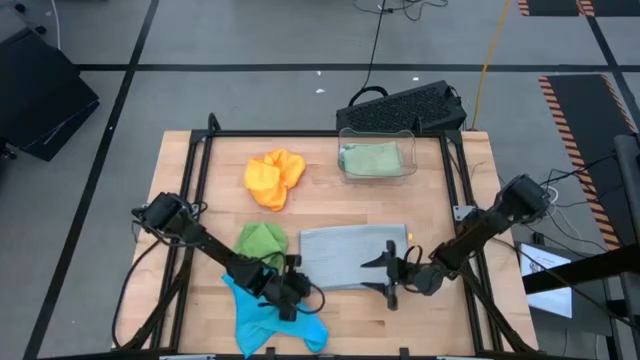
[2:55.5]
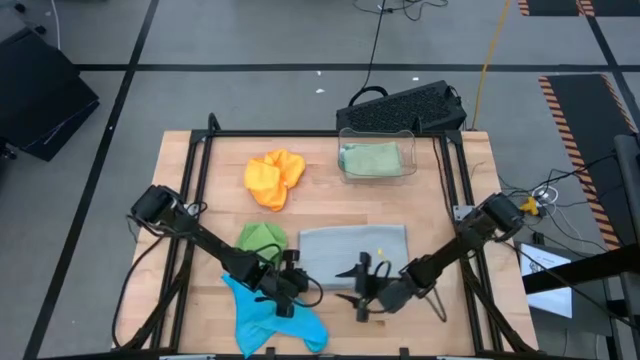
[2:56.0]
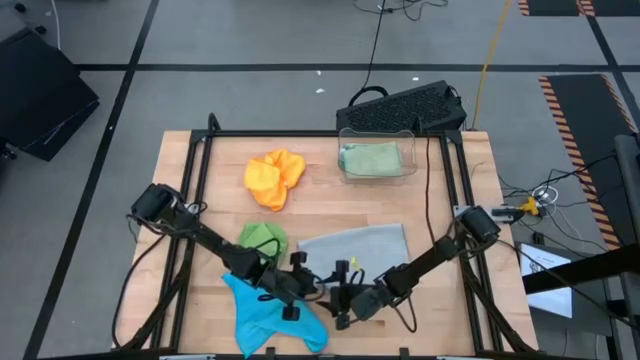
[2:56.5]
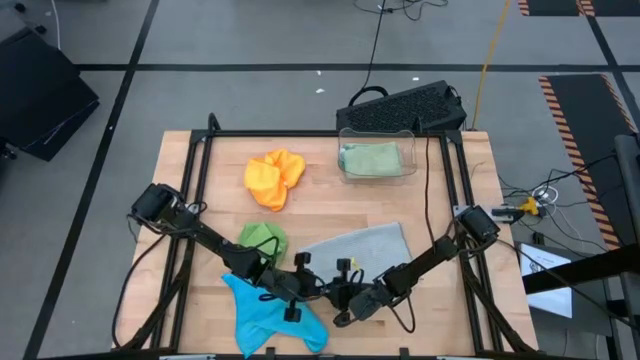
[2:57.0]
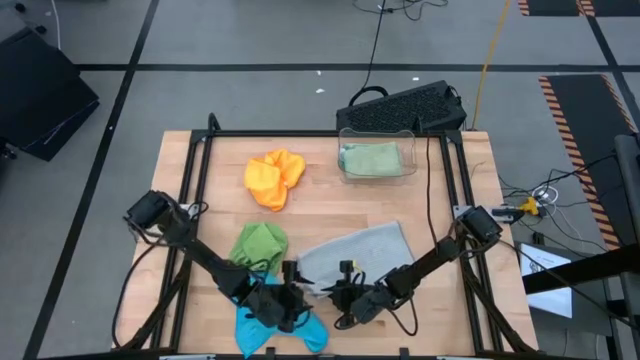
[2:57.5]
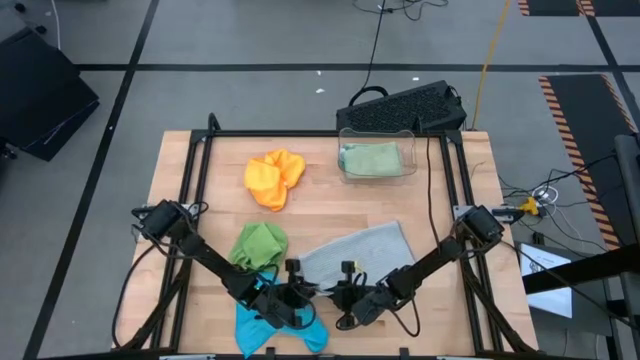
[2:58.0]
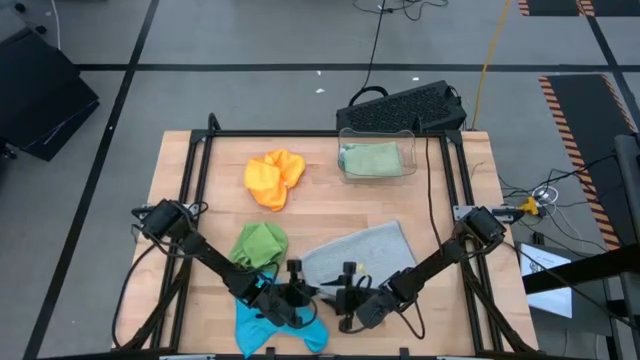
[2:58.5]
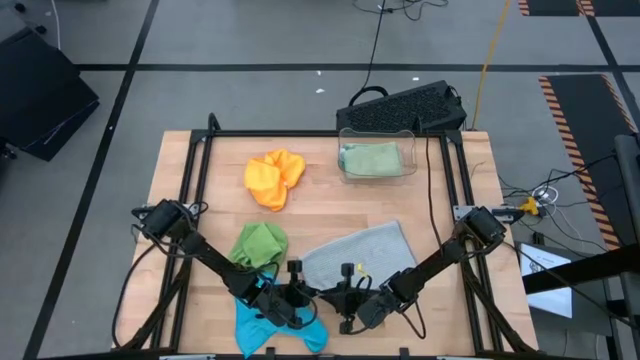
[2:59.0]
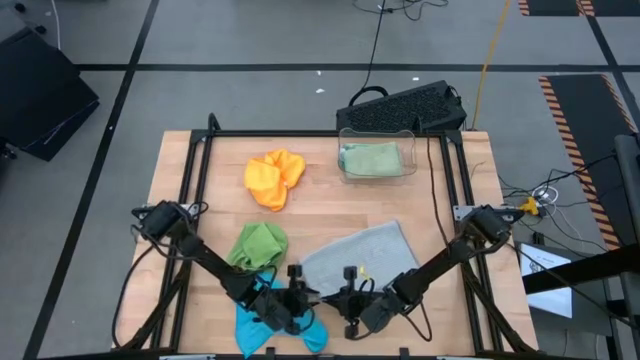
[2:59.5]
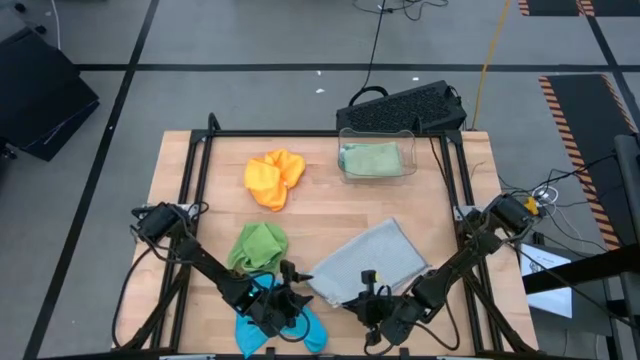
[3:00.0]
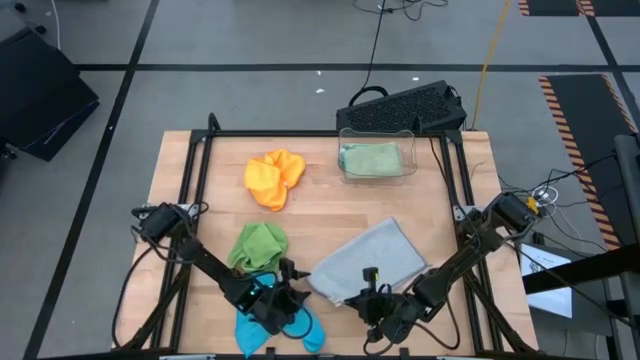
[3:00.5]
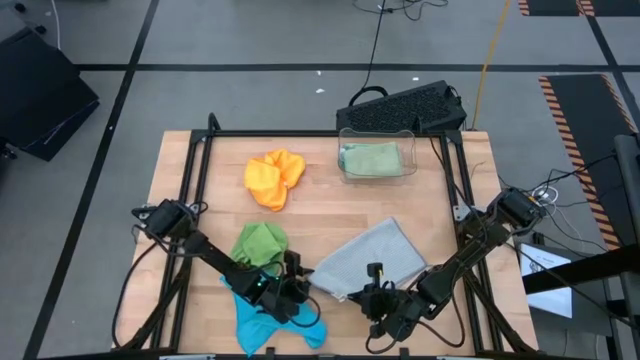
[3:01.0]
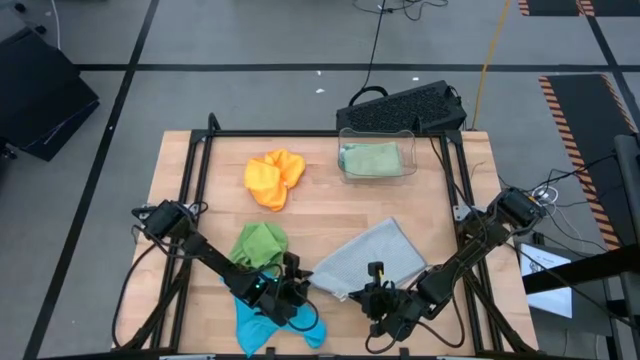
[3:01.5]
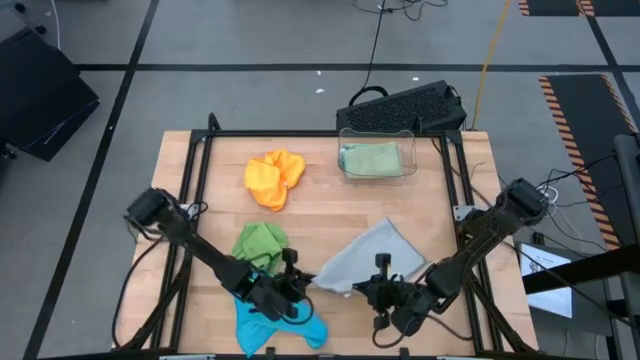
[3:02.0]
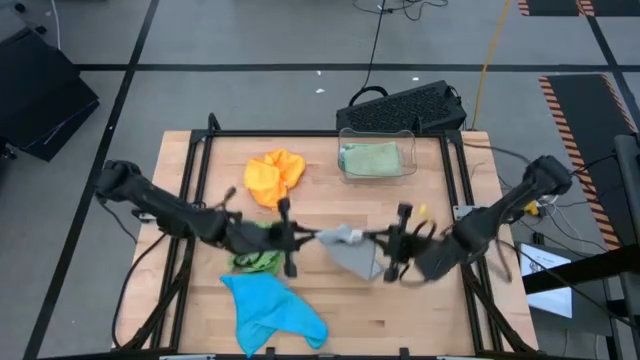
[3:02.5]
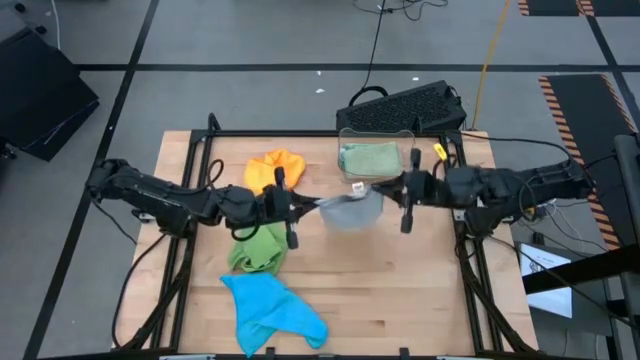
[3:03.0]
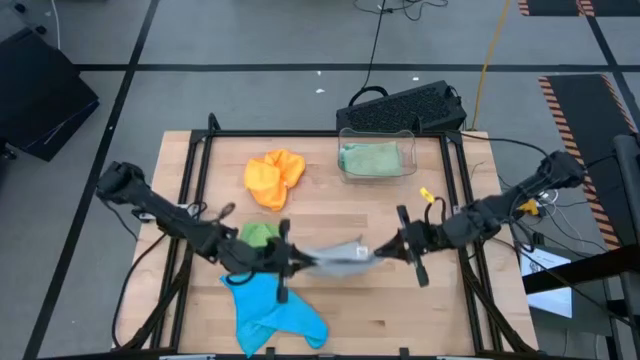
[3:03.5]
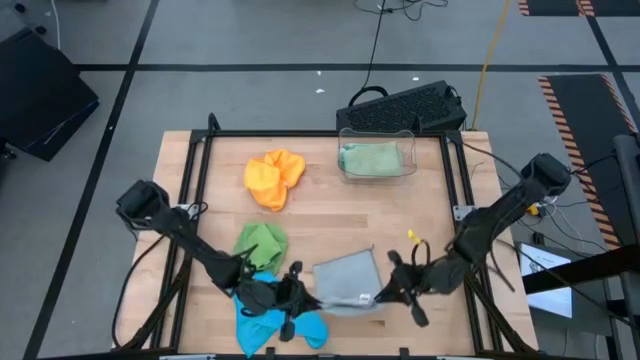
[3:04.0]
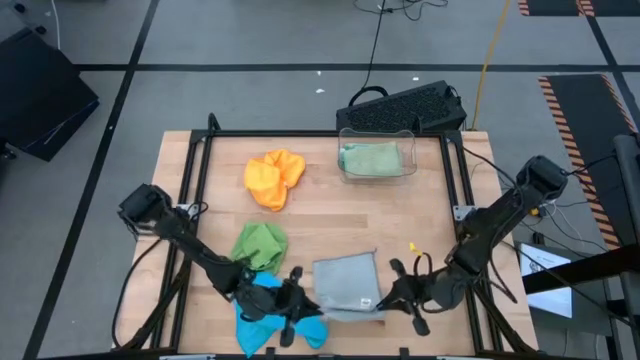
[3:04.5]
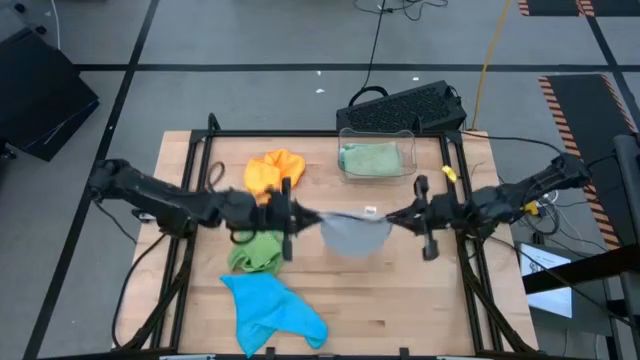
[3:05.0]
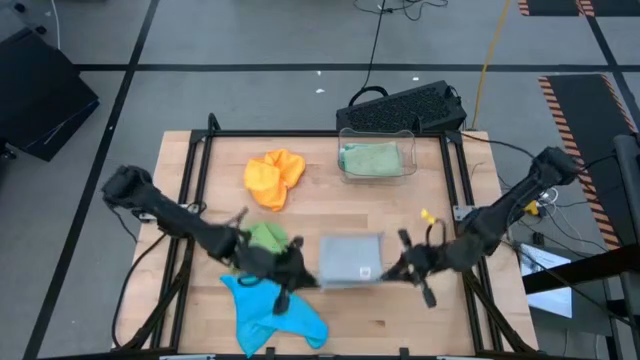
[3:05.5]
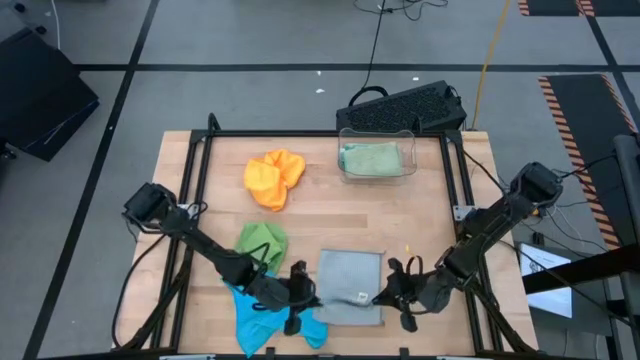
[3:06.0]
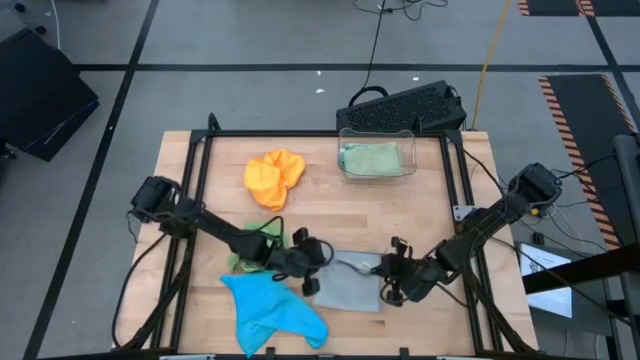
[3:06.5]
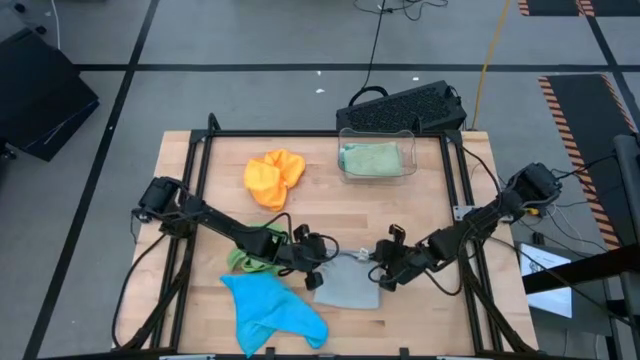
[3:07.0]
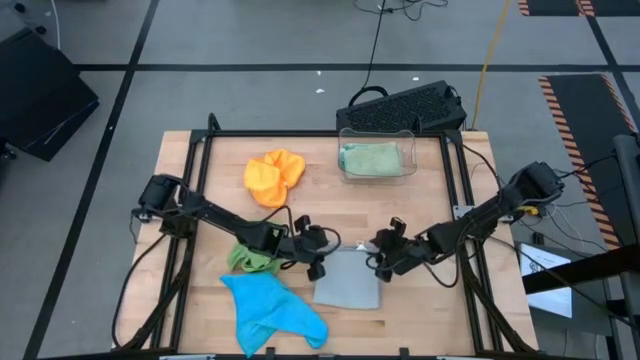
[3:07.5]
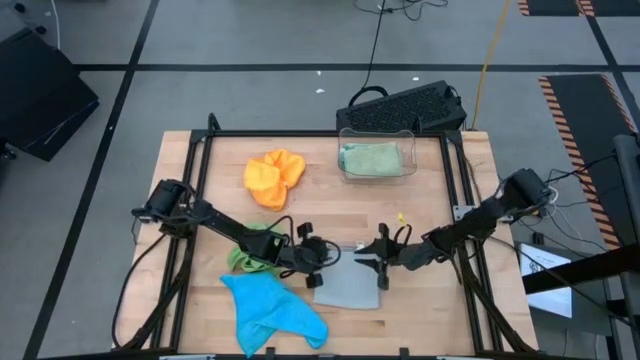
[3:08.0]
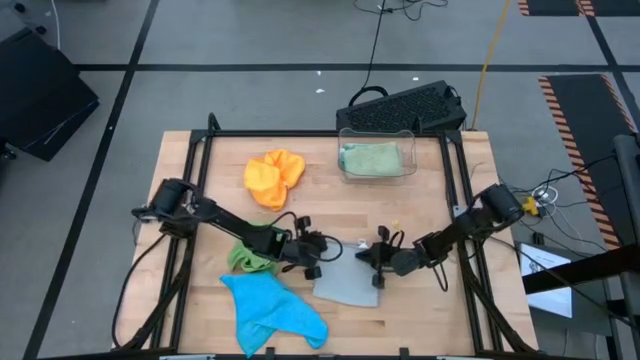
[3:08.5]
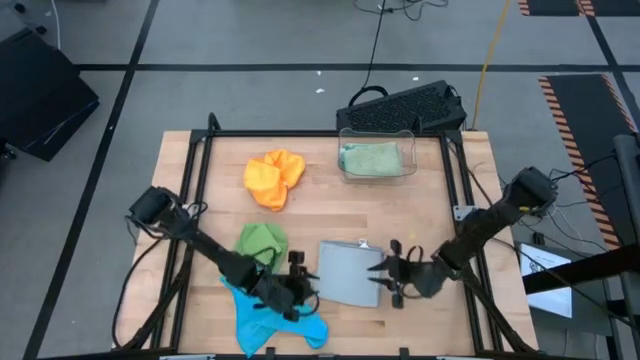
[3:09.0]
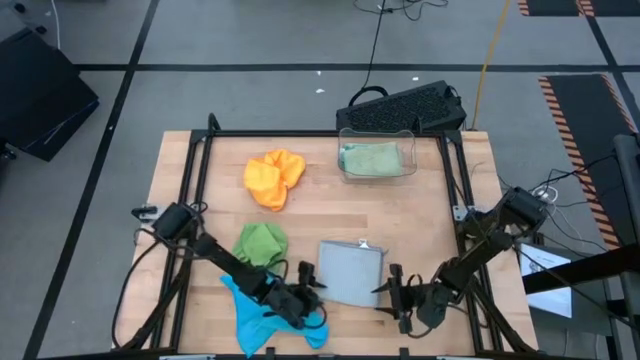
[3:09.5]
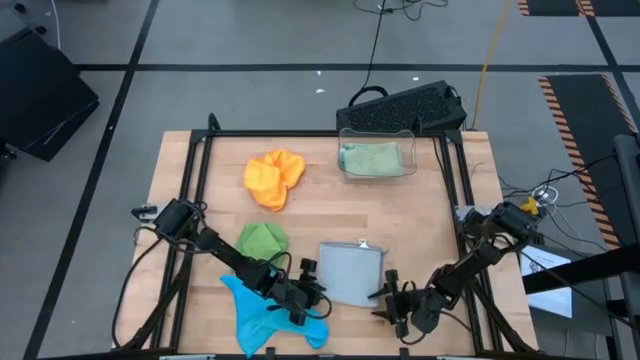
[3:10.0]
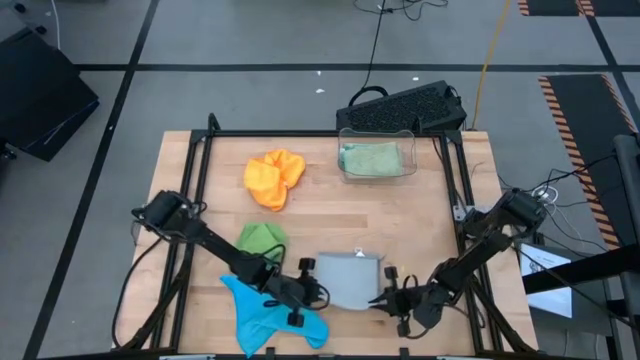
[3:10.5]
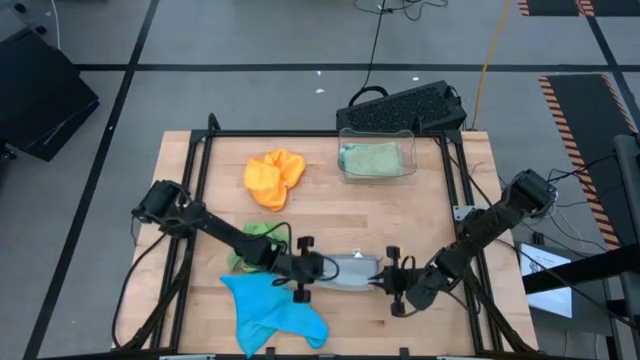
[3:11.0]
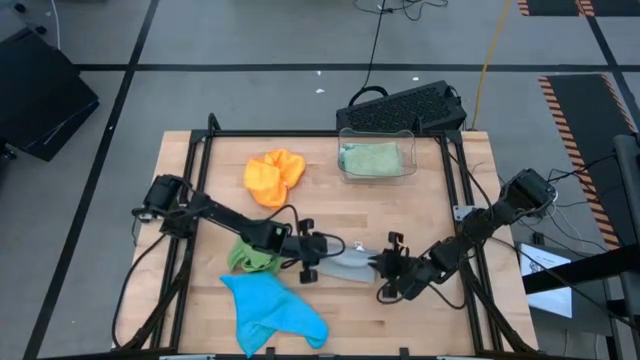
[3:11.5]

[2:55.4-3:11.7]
Task: Fold microfiber towels
Fold the gray microfiber towel

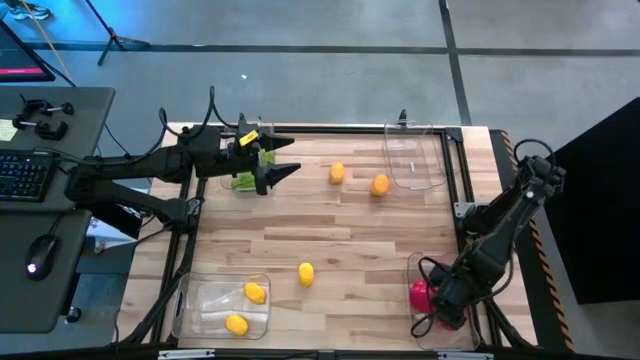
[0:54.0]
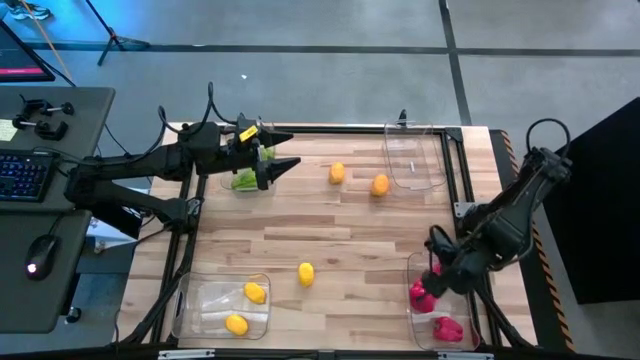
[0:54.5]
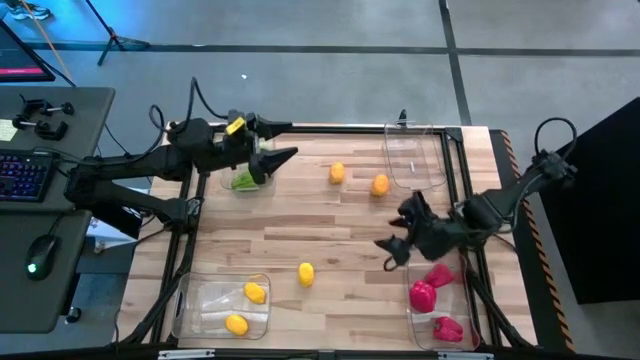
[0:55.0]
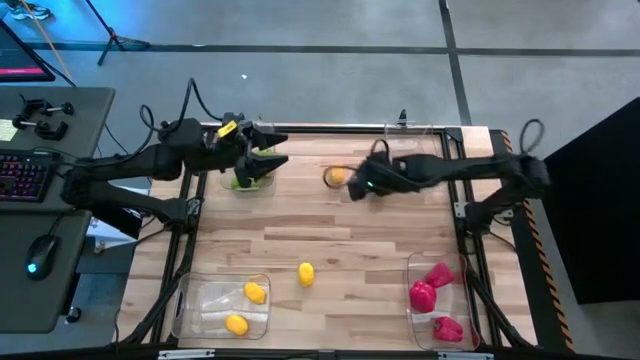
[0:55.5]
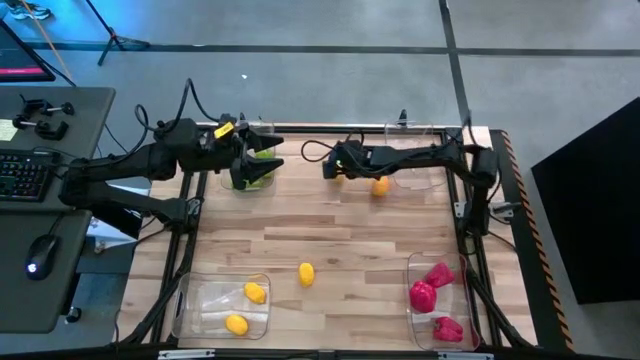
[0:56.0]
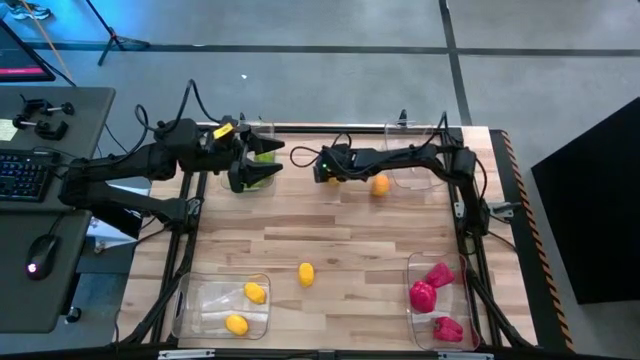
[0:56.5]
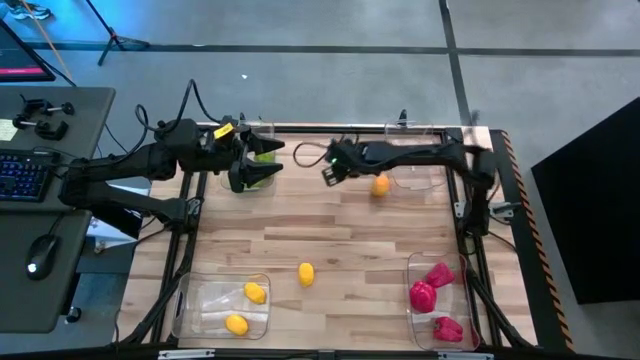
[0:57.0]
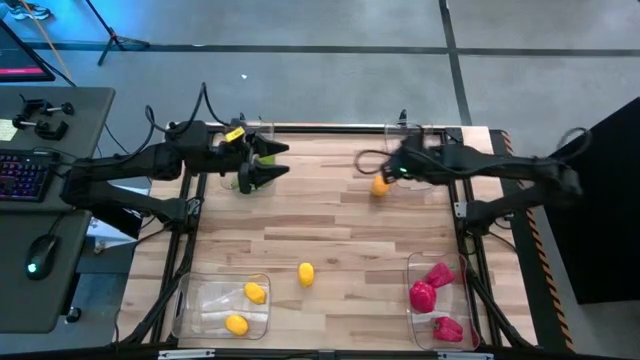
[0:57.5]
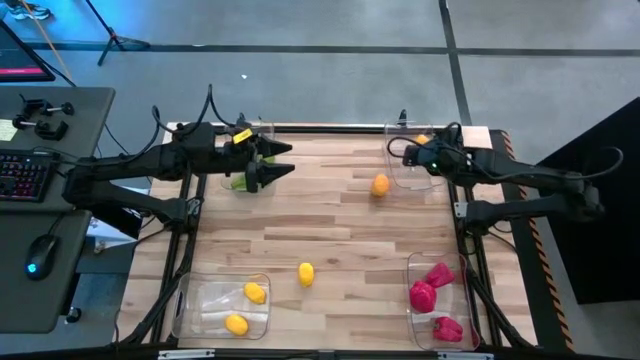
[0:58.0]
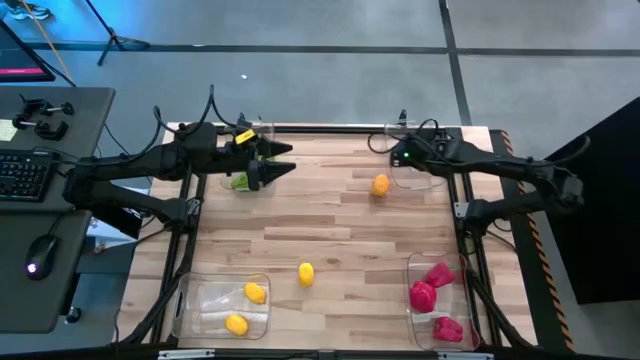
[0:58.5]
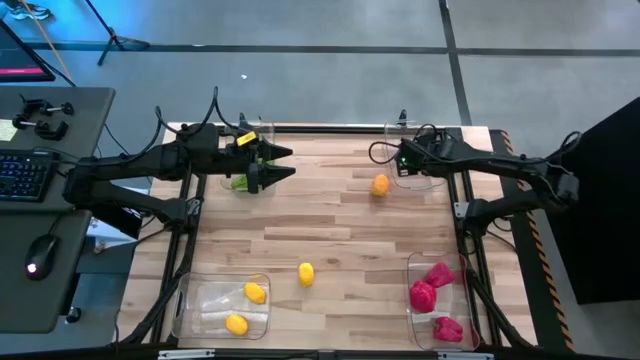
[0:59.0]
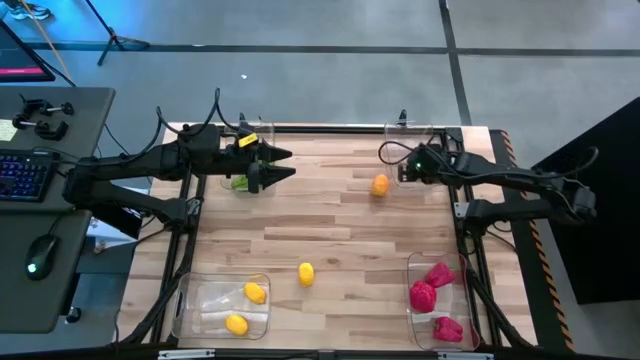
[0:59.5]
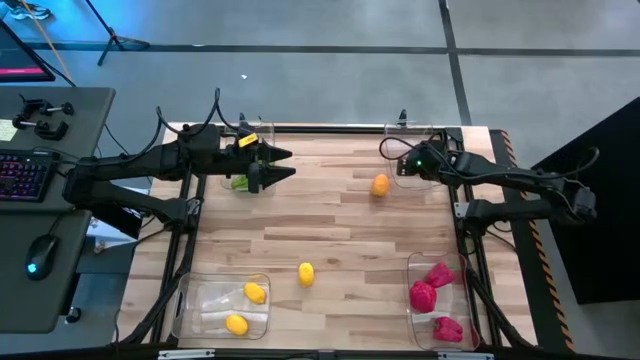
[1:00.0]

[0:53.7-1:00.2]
Task: Sort produce into baskets
Put the lemon into the bottom left transparent bin
